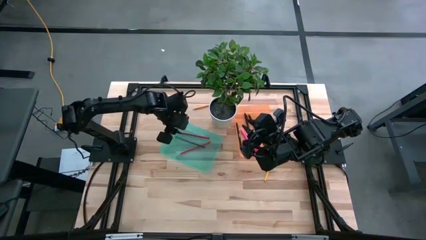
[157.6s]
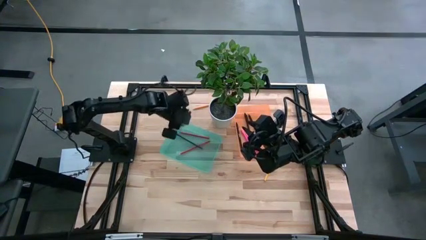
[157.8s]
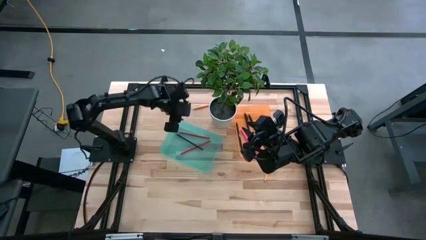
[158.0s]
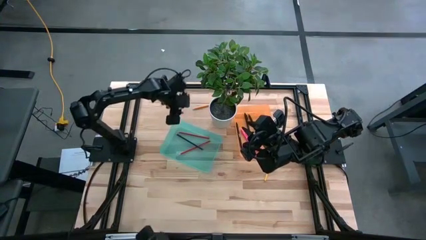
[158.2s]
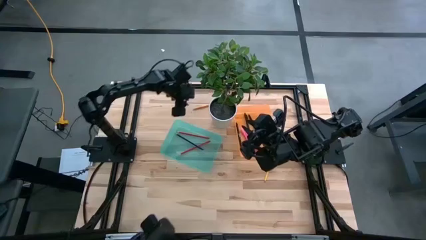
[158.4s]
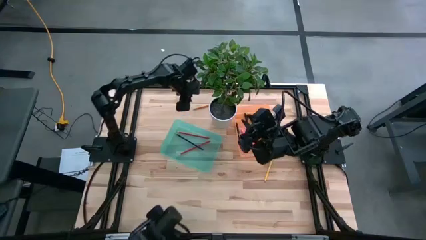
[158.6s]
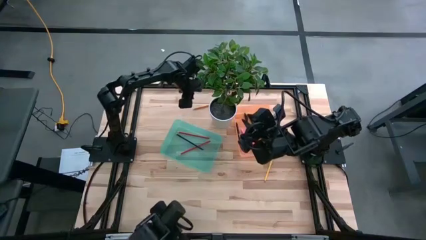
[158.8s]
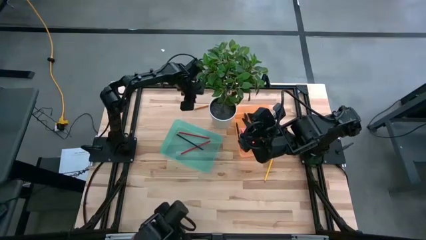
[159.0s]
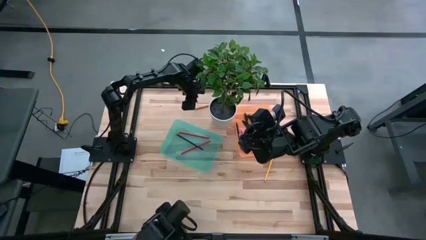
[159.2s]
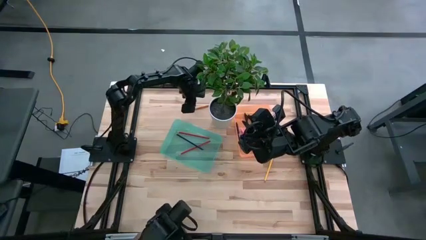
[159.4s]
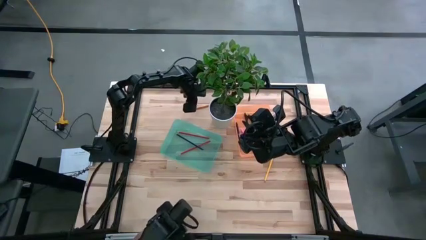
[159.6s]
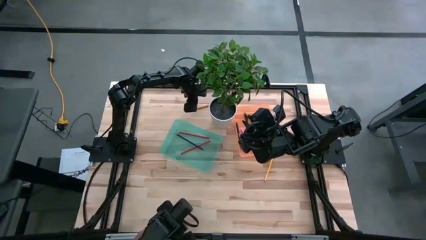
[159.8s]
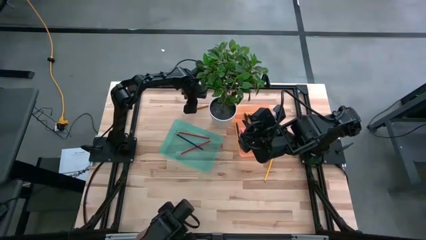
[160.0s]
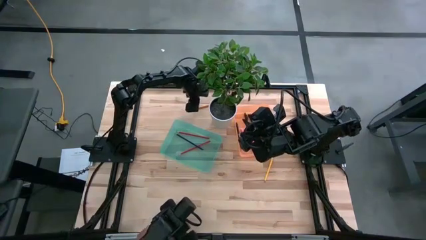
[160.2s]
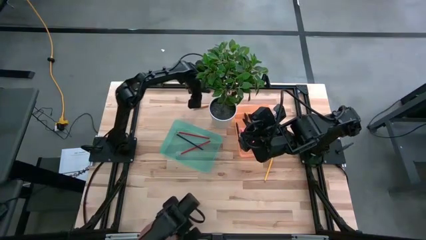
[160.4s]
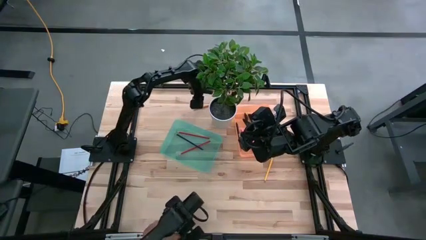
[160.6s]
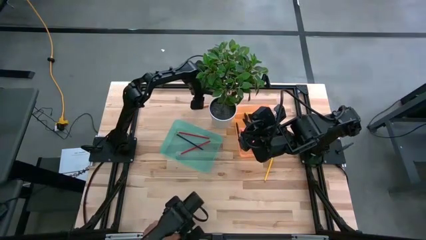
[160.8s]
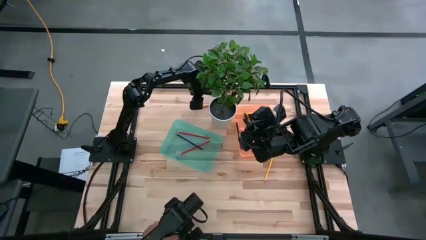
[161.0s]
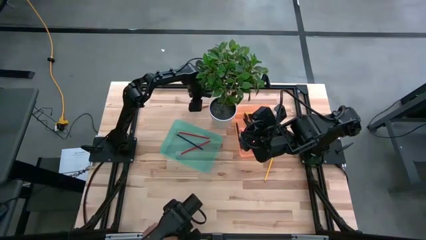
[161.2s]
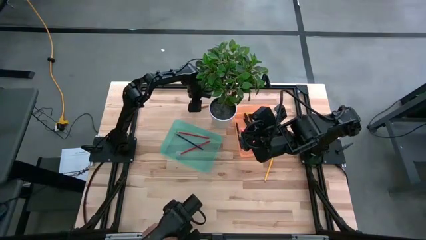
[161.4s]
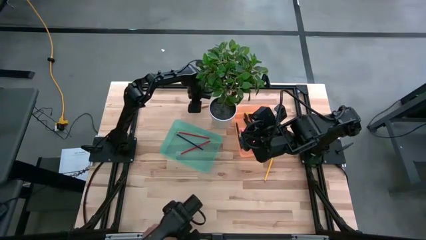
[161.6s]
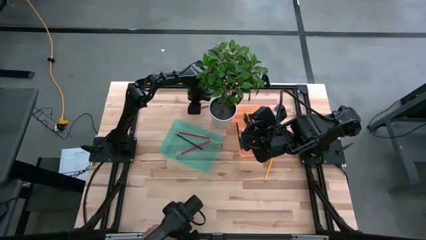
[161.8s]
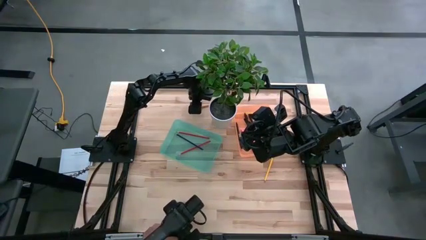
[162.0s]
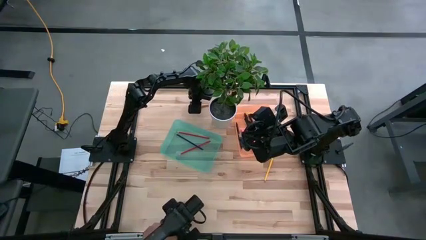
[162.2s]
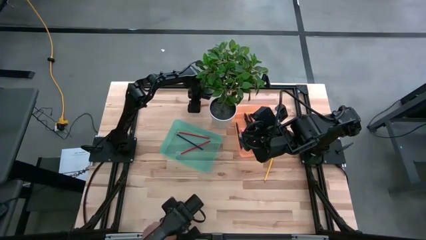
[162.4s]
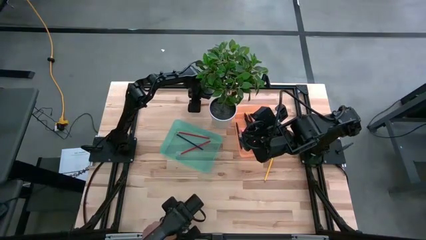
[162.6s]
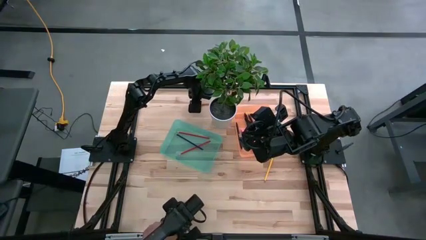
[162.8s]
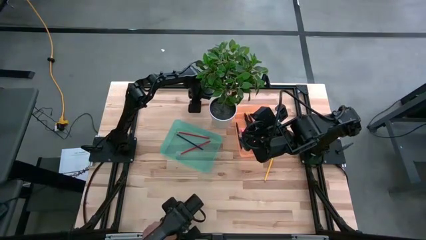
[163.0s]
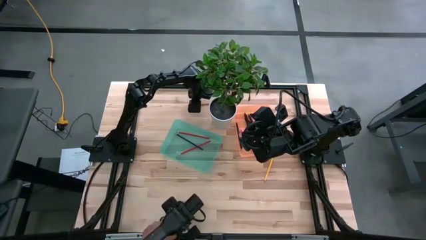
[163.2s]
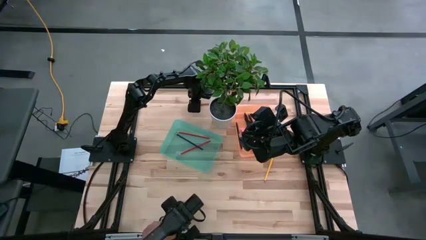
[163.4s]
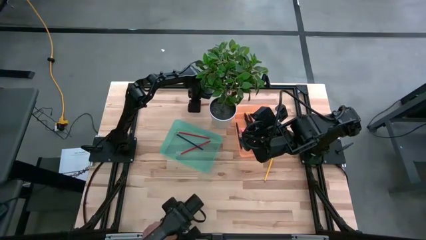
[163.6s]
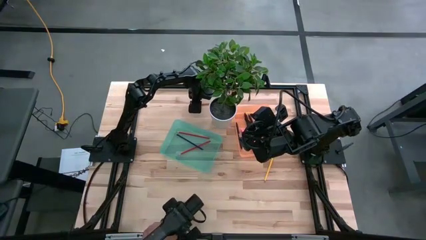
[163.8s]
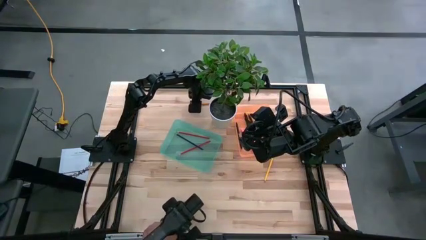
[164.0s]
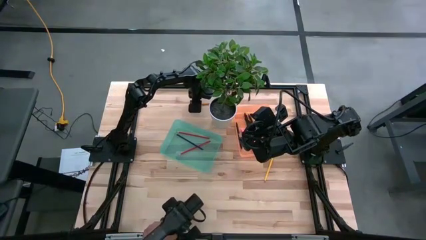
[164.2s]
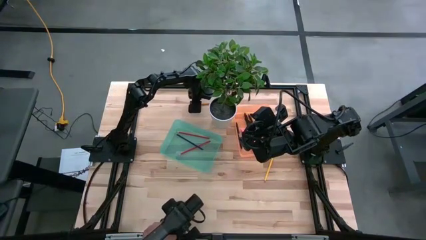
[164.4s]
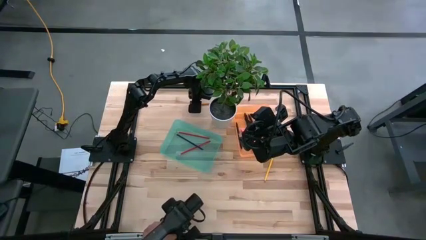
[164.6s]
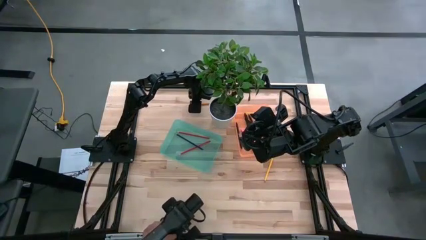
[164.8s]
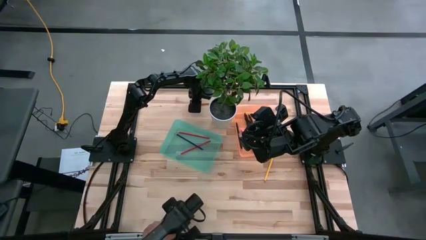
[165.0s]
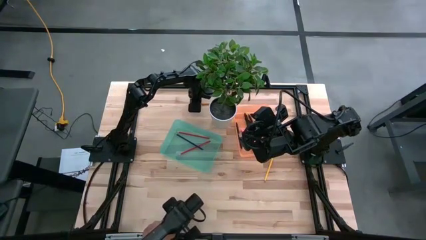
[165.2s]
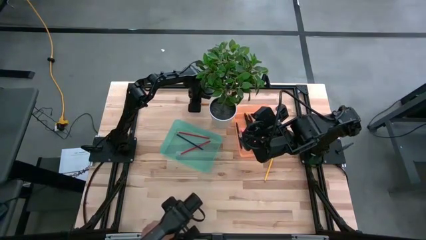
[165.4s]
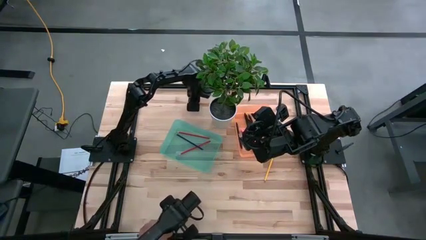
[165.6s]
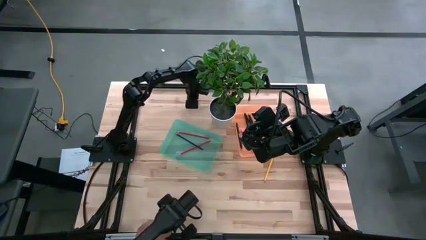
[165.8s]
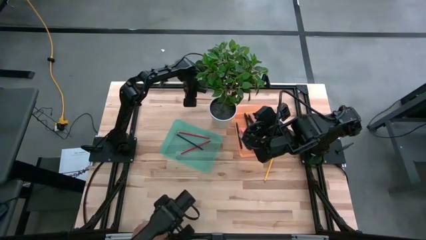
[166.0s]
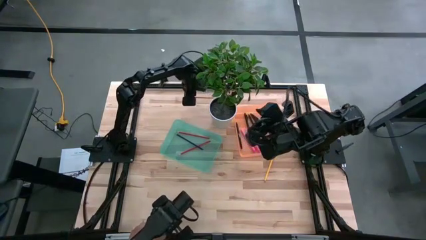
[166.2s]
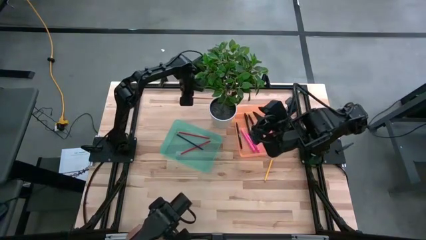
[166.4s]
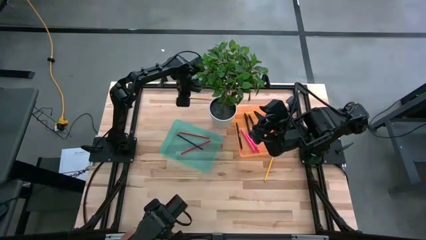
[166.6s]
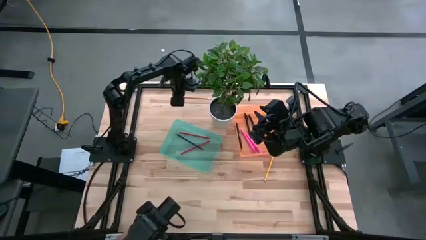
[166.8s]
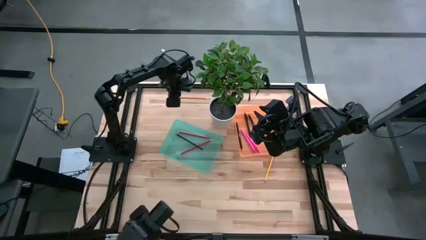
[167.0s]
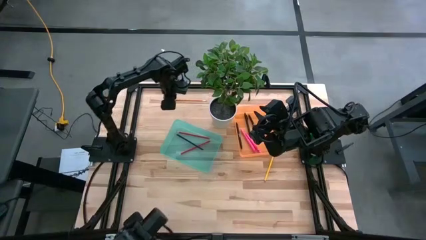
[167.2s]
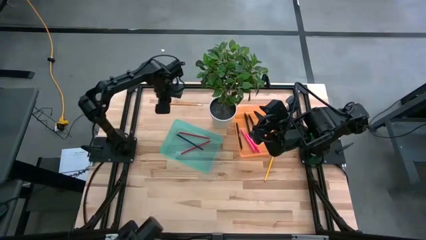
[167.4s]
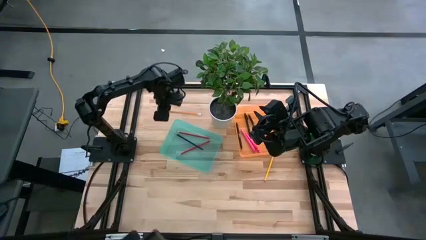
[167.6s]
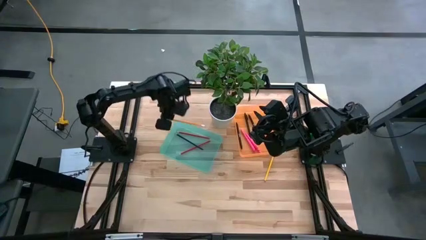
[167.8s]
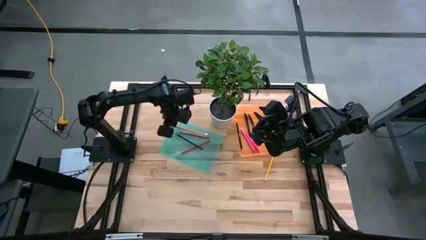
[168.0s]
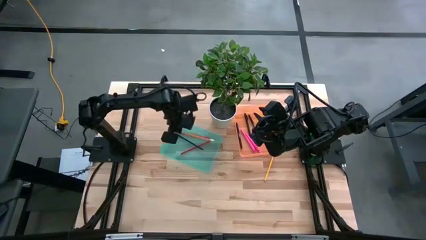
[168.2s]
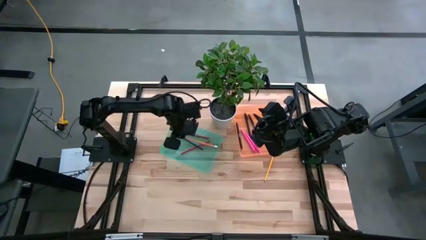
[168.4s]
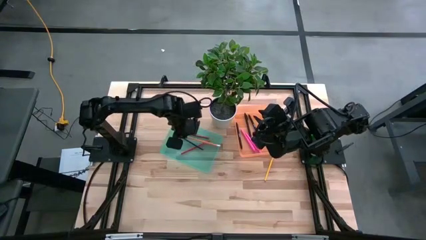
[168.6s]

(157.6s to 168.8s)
Task: Sort pens & pencils
Put the orange pencil into the blue bin

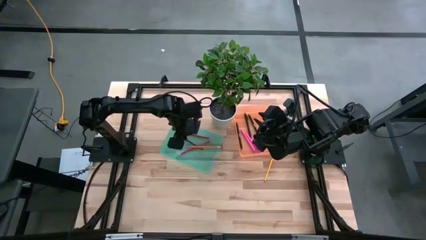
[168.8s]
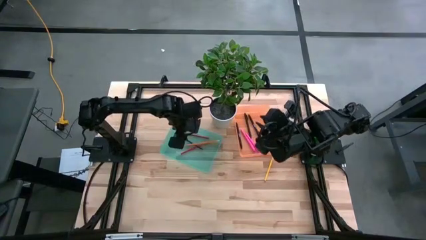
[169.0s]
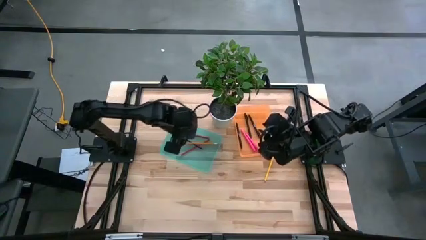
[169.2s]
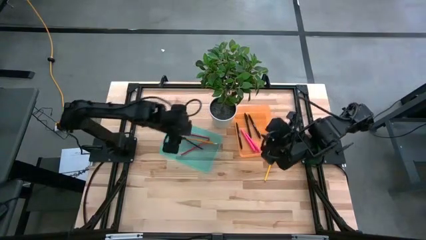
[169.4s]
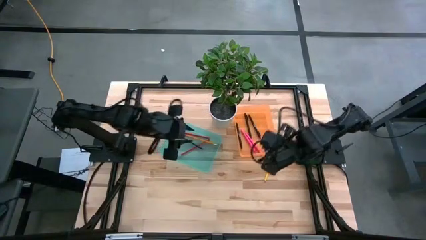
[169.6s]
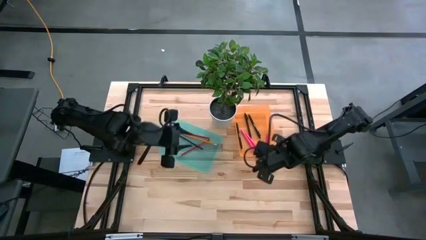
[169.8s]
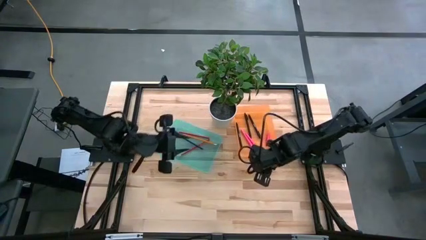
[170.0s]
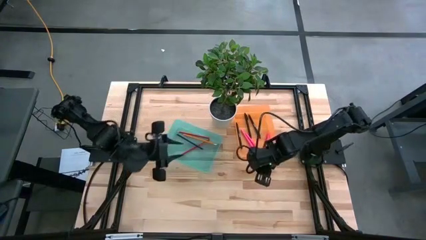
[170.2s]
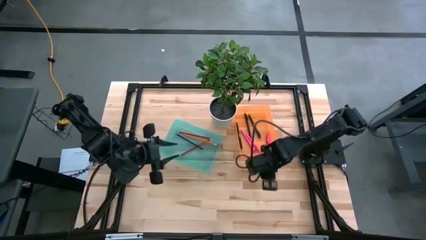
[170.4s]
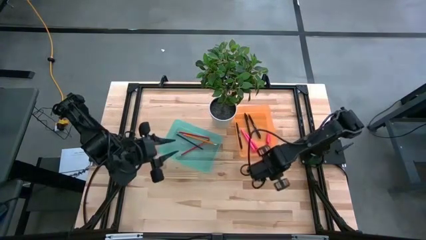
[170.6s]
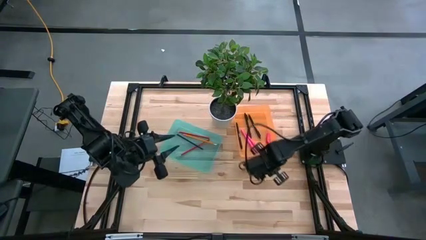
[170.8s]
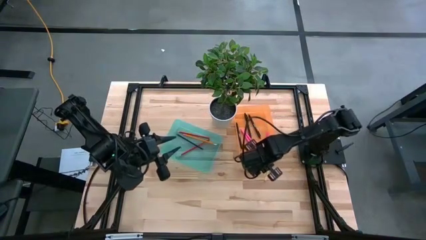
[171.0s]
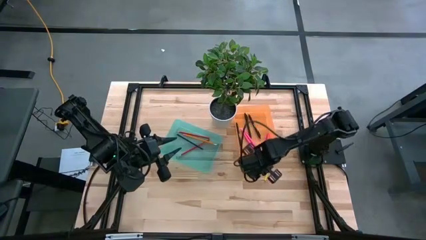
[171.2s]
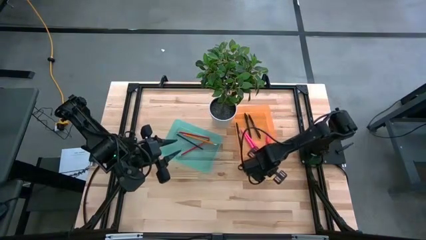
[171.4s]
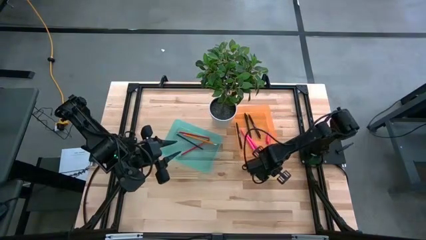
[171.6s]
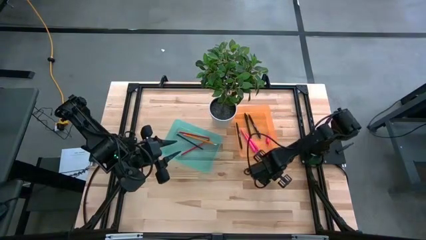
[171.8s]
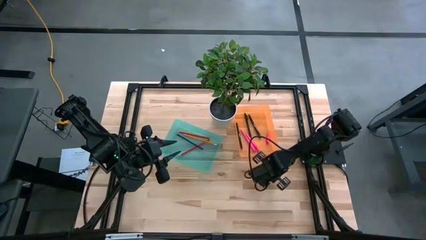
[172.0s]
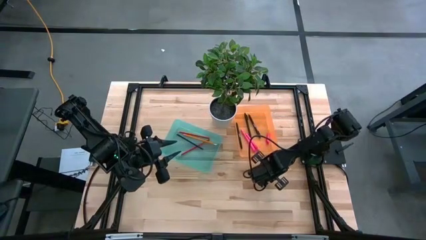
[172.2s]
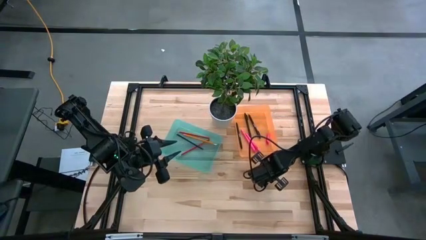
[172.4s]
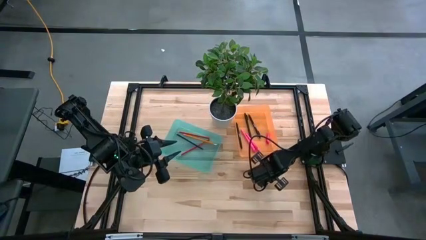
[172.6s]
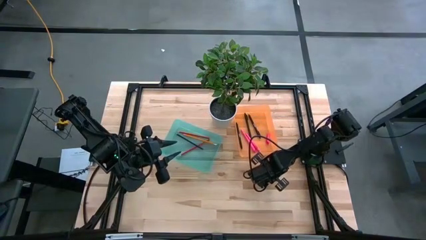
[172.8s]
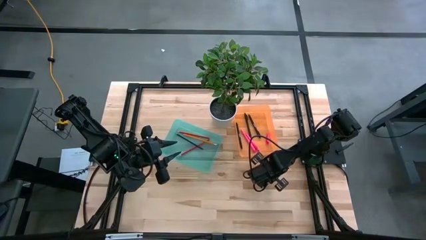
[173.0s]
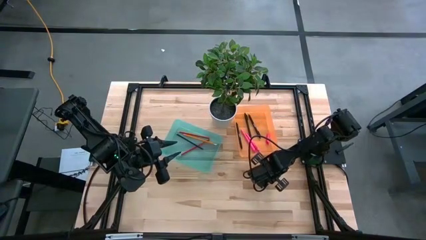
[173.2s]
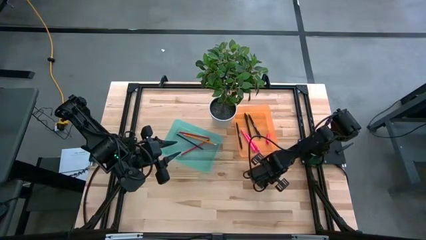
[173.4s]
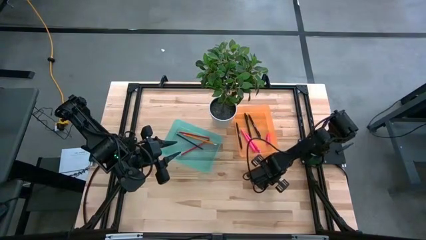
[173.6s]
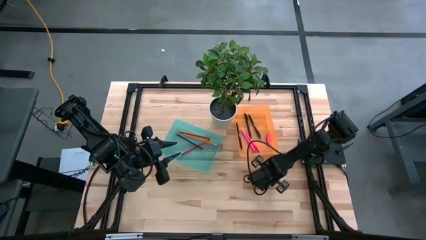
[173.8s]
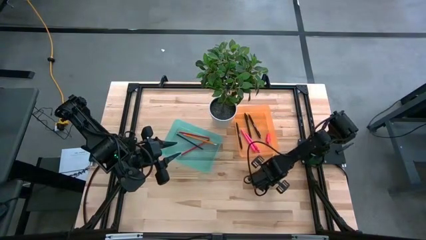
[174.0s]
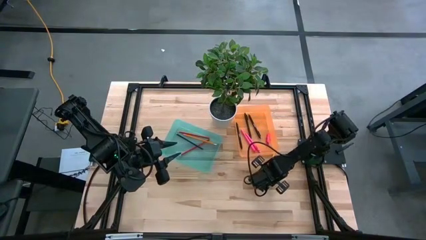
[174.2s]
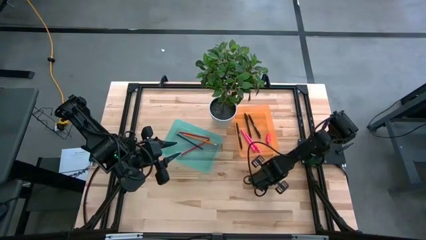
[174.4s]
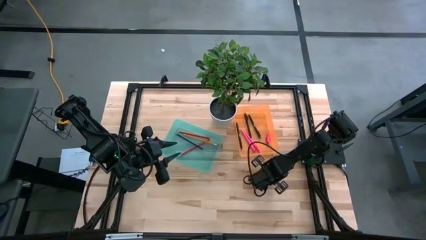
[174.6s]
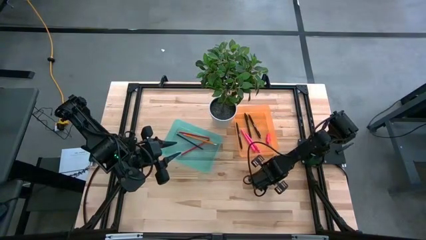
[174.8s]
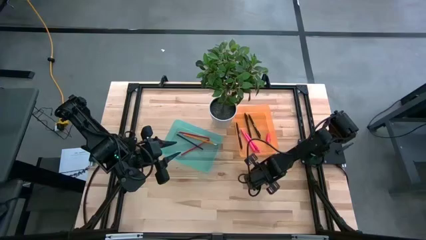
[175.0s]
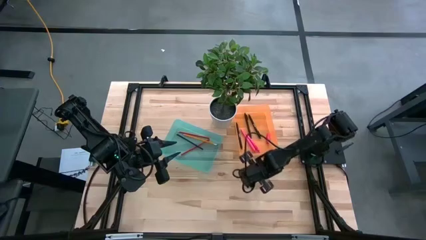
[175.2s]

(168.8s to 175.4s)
Put the yellow pencil into the blue bin
